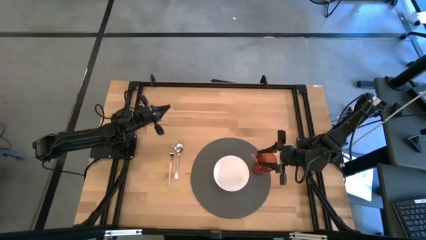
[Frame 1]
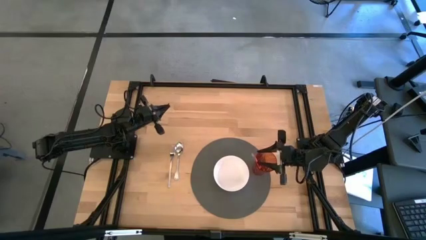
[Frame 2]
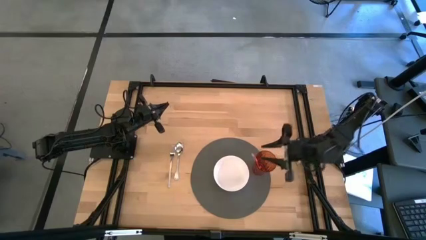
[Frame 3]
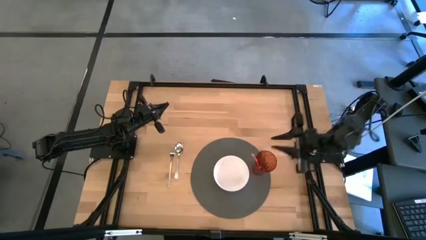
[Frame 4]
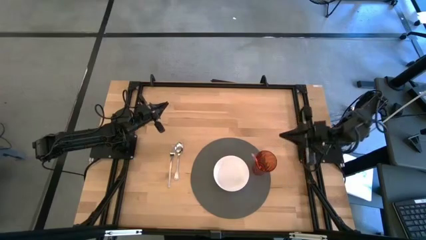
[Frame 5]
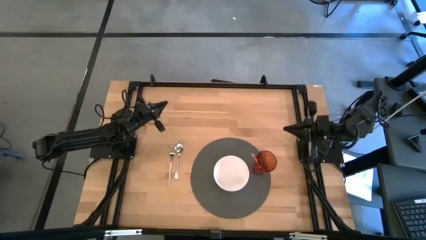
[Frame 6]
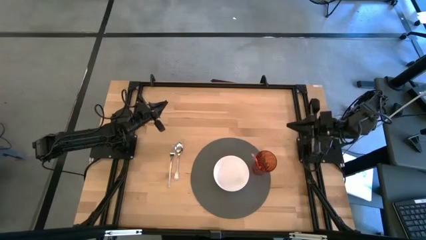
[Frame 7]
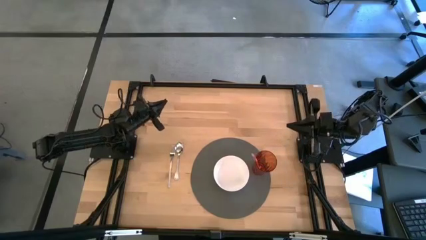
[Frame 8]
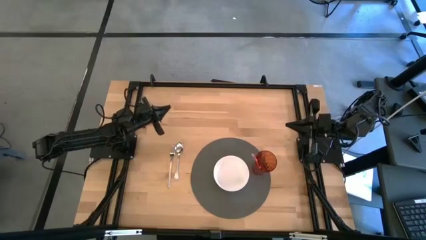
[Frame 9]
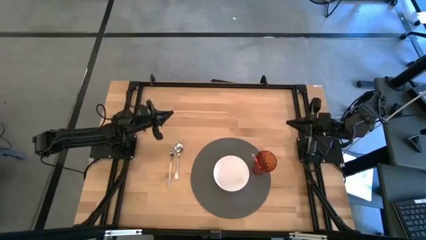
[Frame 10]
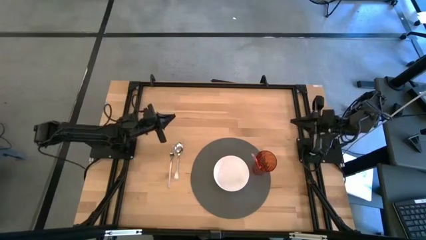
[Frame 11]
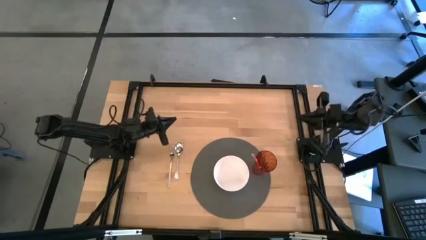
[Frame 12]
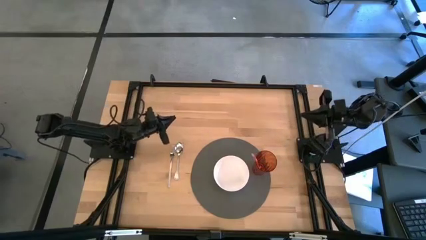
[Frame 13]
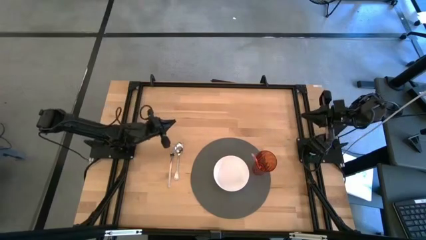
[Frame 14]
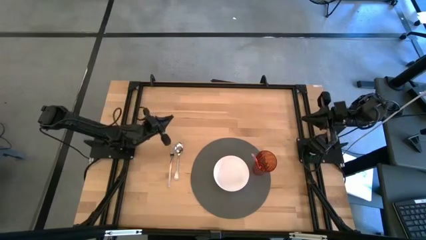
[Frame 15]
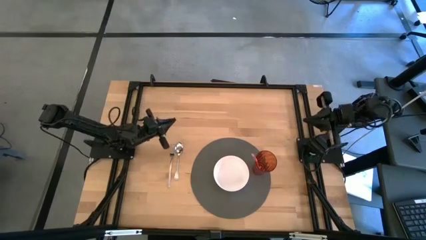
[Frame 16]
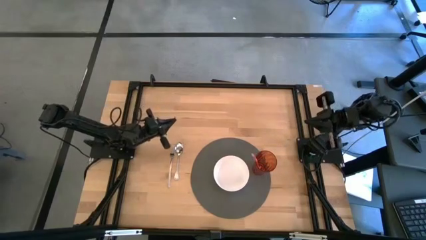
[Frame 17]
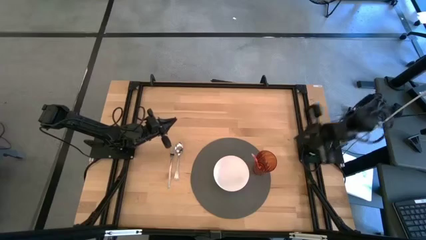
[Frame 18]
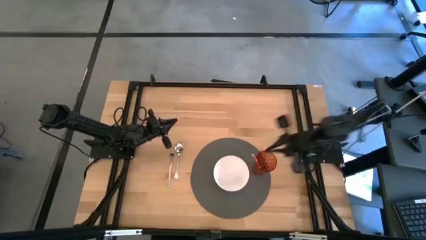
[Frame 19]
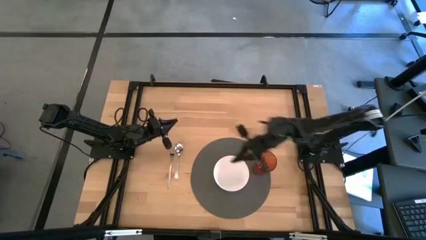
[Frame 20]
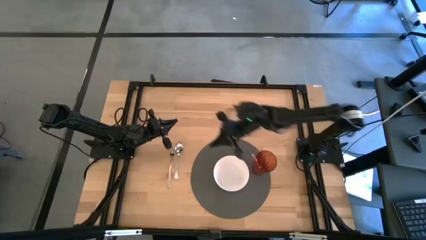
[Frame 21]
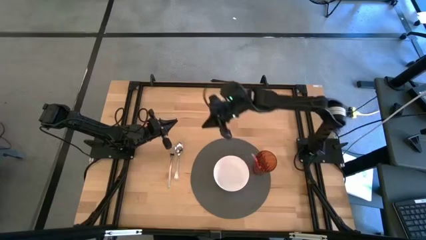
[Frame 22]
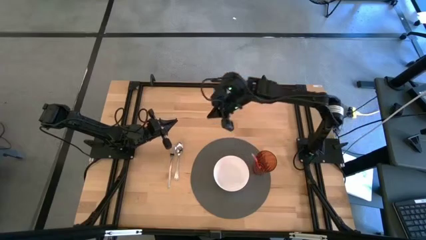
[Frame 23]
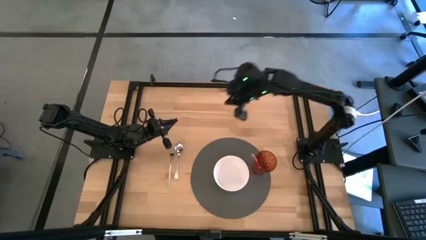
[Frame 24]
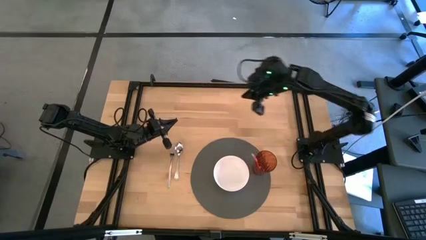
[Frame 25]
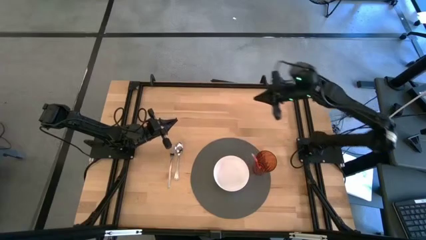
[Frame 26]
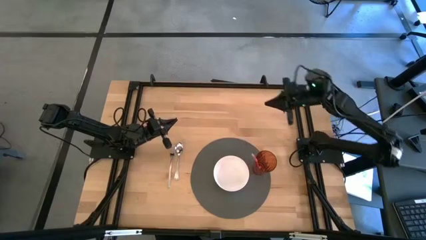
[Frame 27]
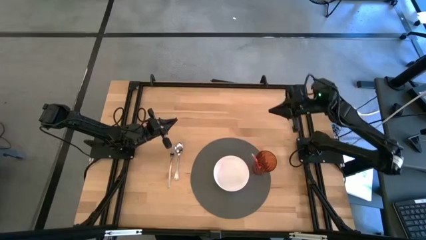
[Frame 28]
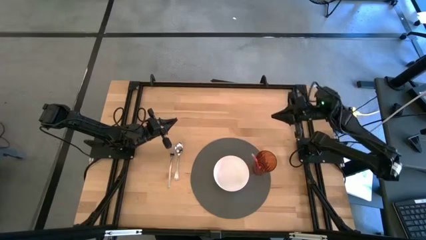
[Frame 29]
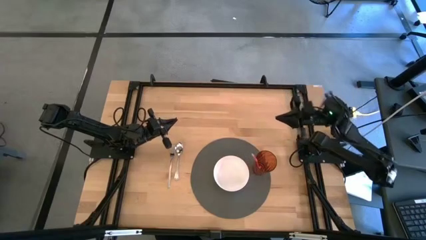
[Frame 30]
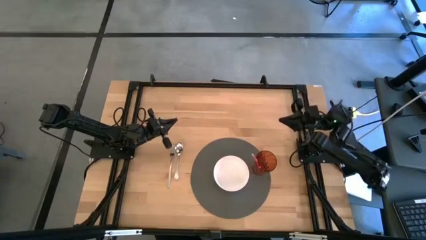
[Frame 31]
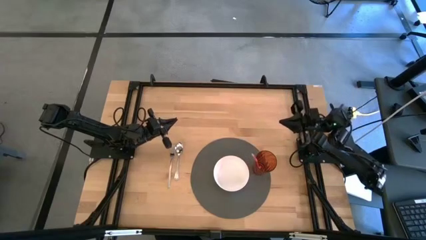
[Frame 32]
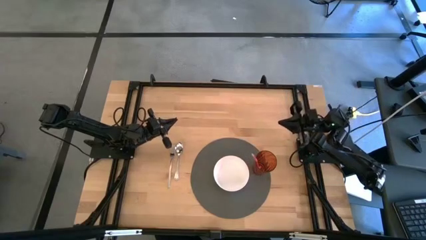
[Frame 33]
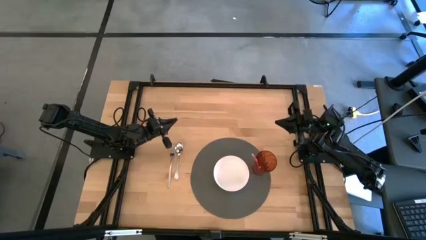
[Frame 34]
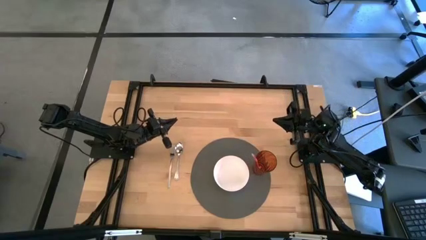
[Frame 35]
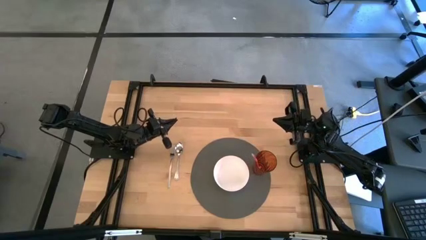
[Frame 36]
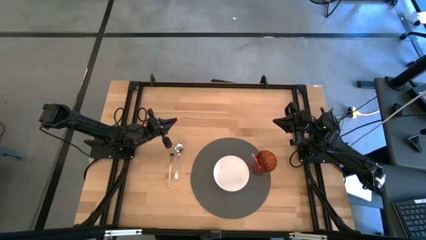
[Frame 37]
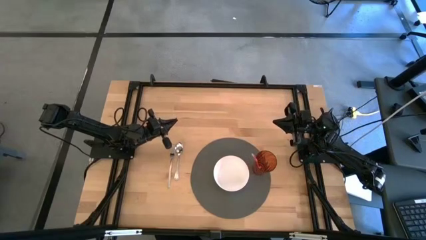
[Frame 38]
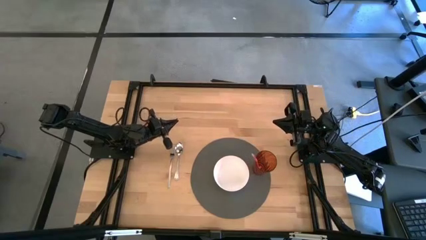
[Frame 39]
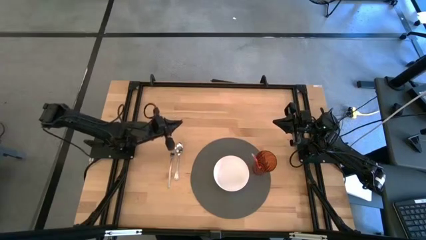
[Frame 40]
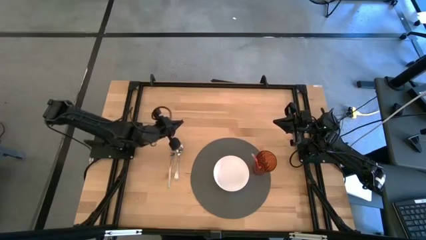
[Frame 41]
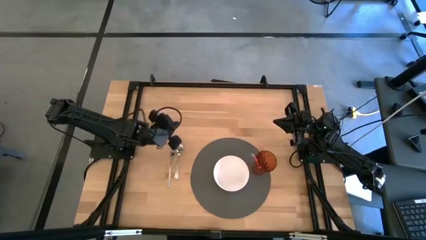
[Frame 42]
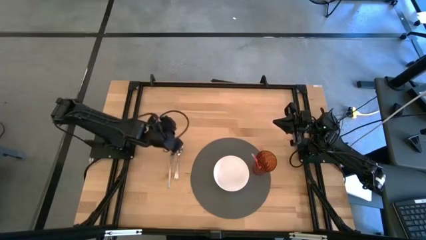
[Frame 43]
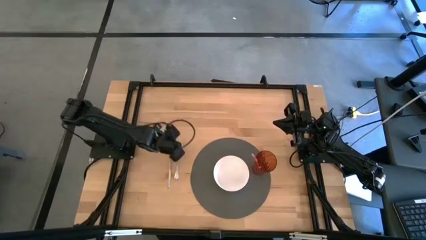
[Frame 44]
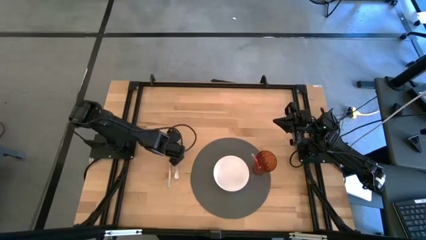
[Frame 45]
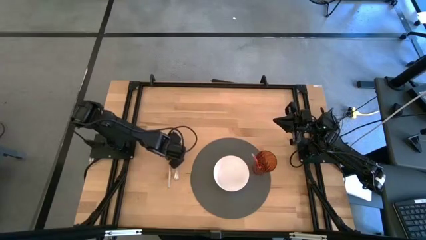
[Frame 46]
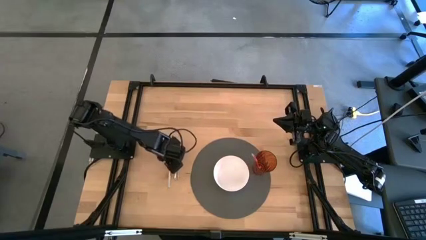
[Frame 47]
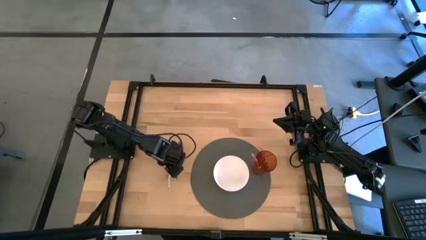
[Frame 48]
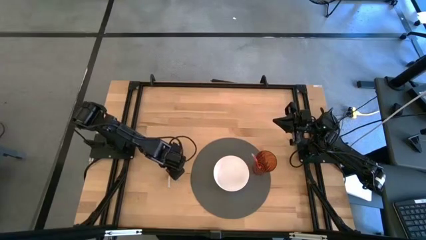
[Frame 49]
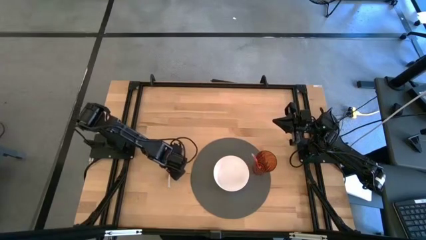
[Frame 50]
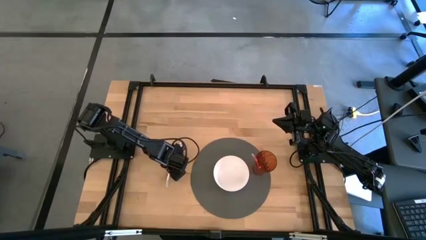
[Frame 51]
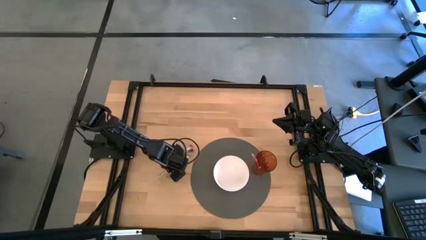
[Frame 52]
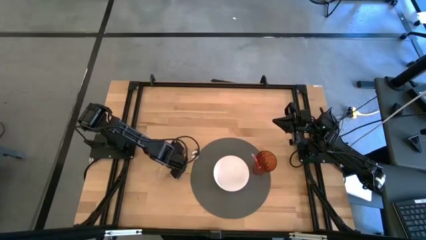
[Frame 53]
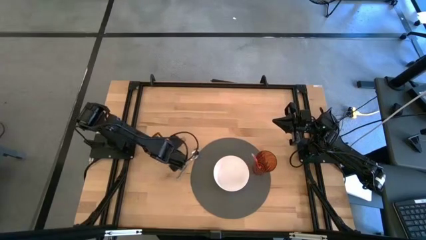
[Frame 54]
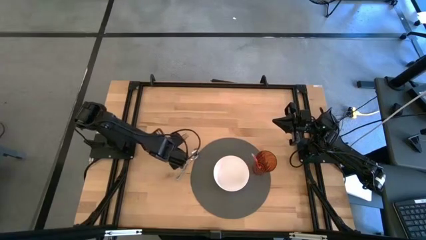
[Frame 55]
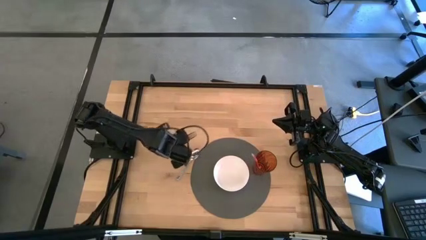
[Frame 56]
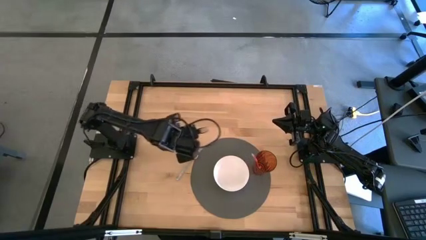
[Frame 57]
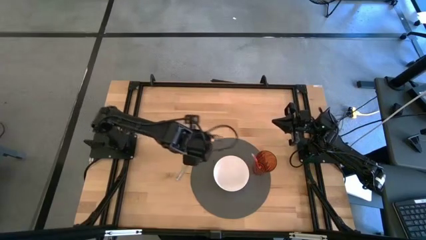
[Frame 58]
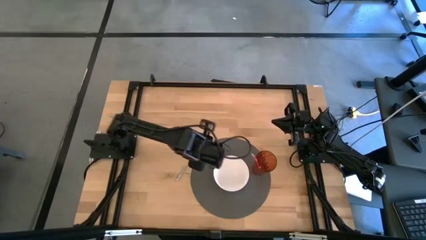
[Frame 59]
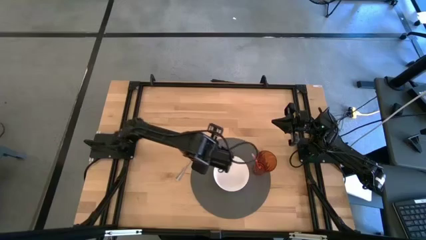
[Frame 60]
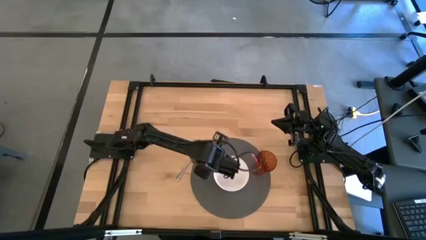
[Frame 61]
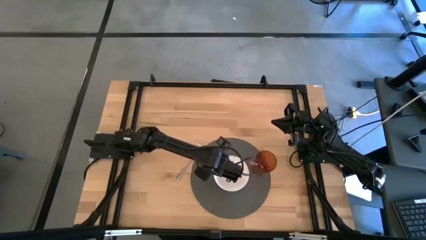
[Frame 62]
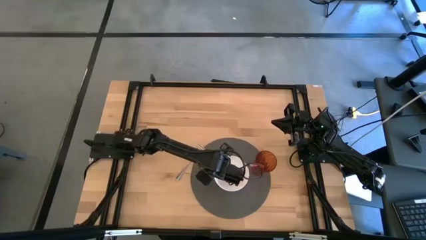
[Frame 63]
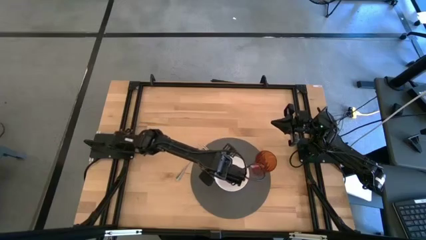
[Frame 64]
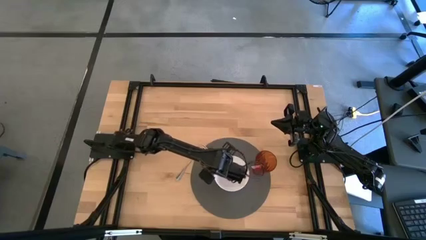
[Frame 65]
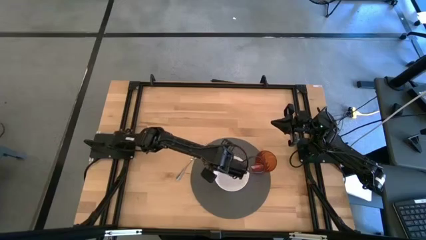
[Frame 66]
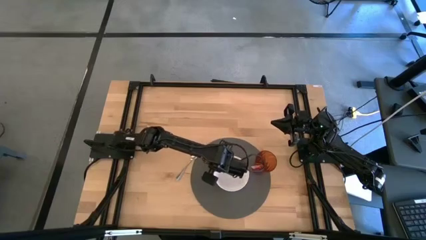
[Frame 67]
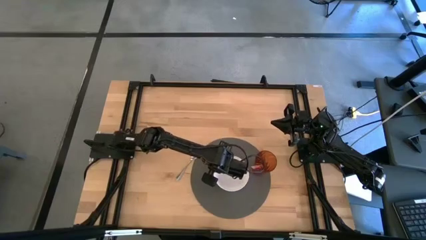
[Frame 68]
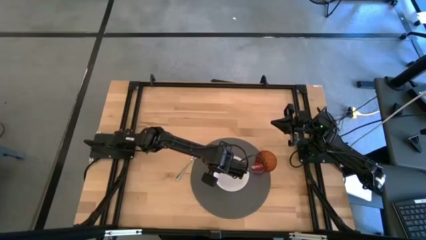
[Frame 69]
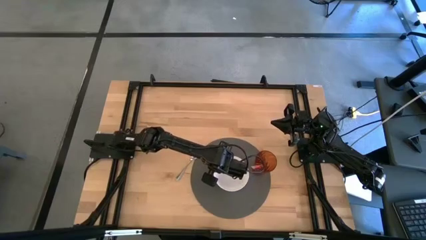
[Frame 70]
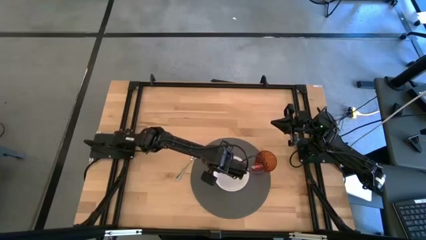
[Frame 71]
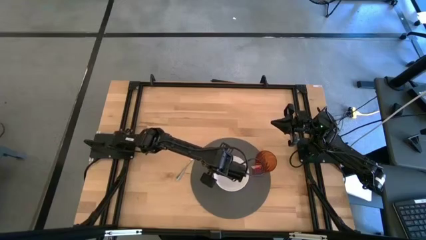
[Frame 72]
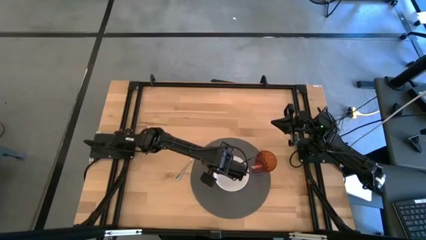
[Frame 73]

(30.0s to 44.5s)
Task: Pick & Place Utensil
Put the silver fork into the white bowl
